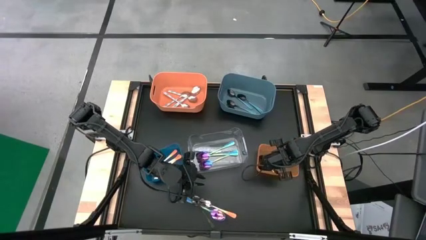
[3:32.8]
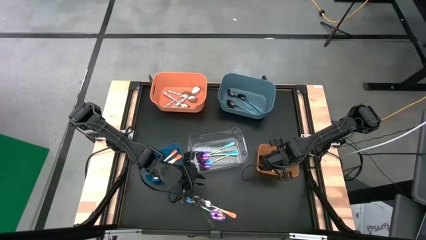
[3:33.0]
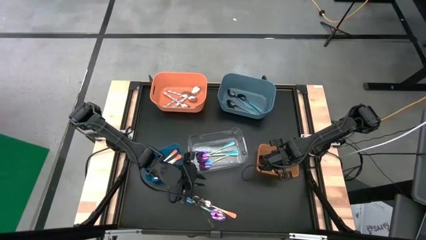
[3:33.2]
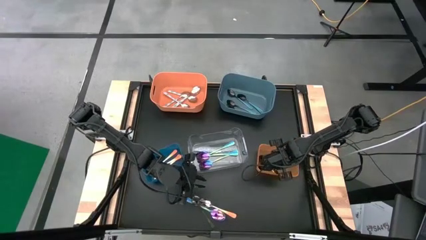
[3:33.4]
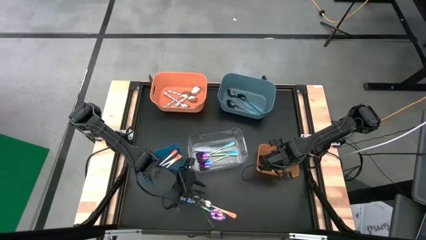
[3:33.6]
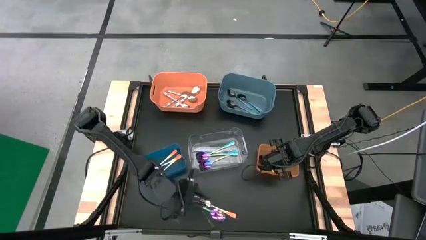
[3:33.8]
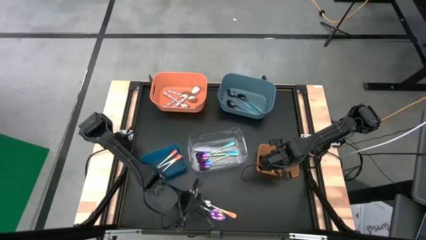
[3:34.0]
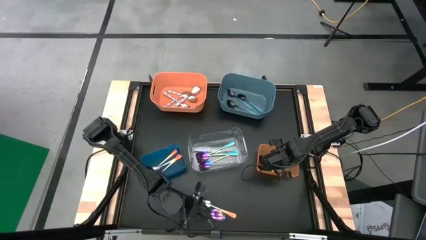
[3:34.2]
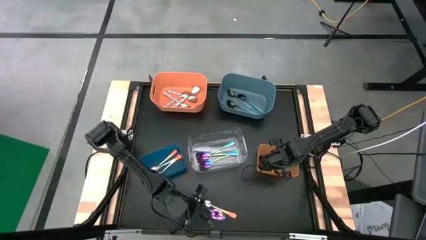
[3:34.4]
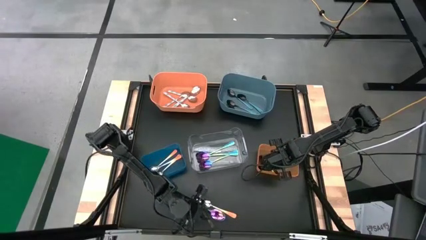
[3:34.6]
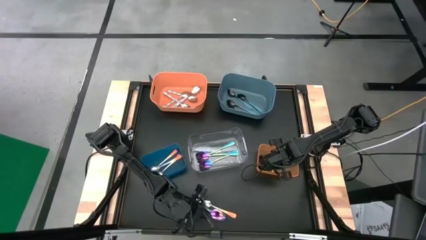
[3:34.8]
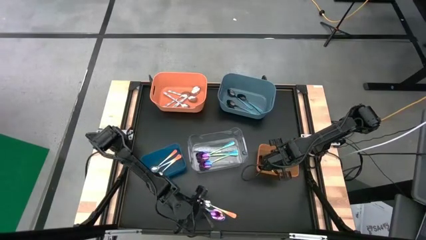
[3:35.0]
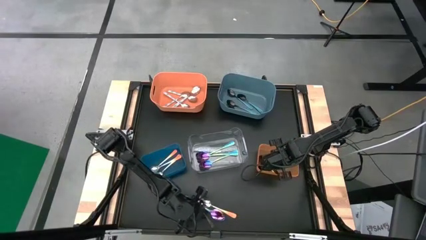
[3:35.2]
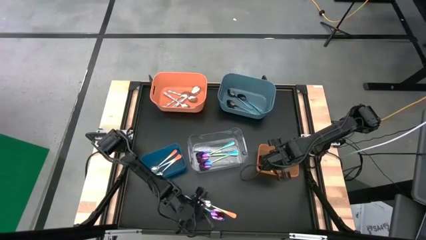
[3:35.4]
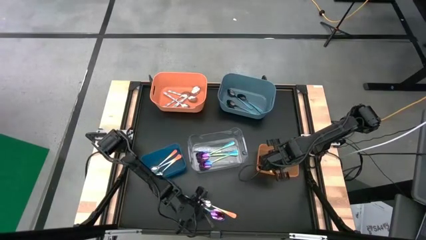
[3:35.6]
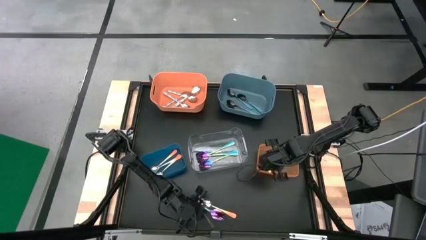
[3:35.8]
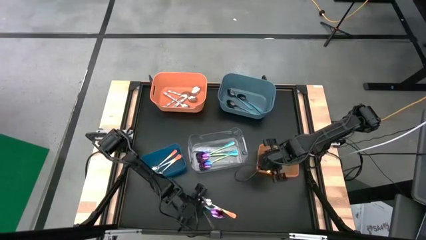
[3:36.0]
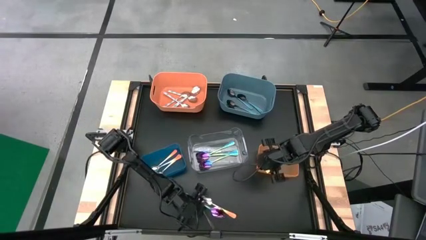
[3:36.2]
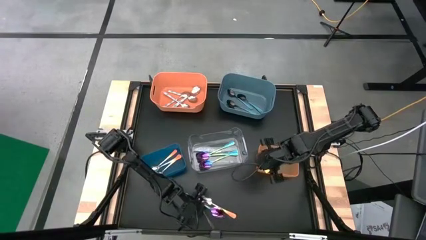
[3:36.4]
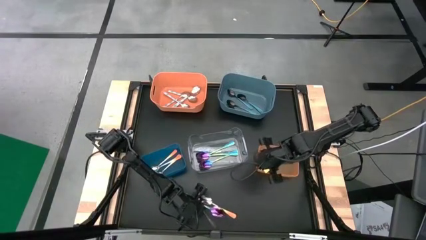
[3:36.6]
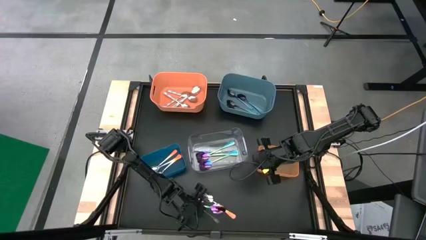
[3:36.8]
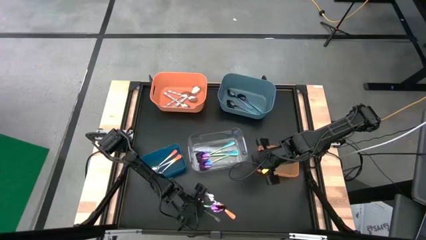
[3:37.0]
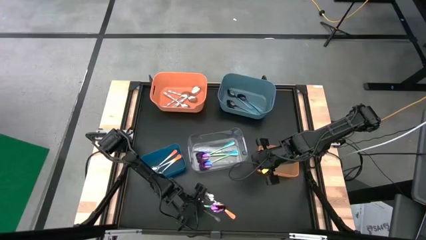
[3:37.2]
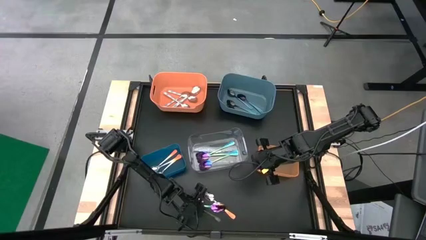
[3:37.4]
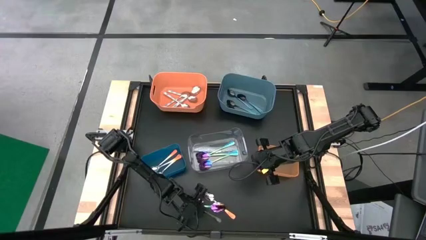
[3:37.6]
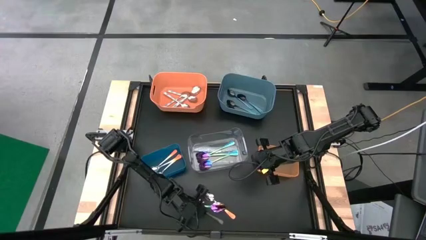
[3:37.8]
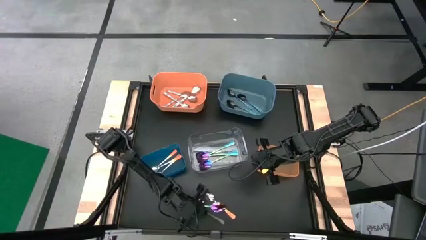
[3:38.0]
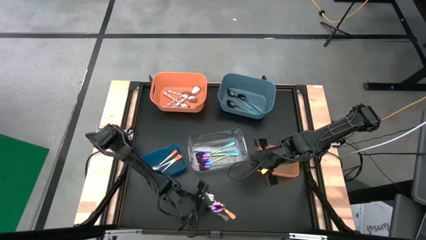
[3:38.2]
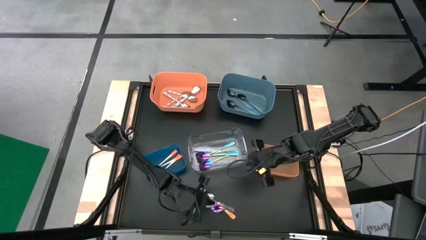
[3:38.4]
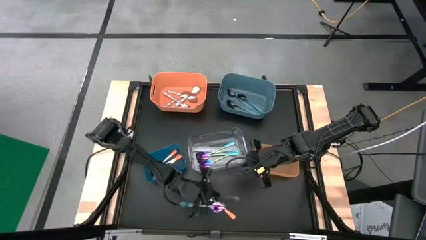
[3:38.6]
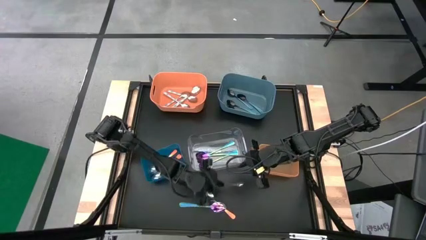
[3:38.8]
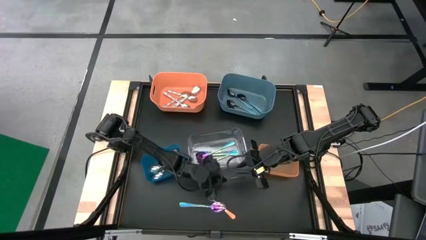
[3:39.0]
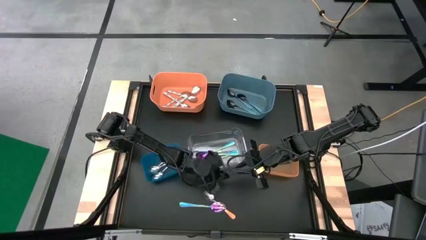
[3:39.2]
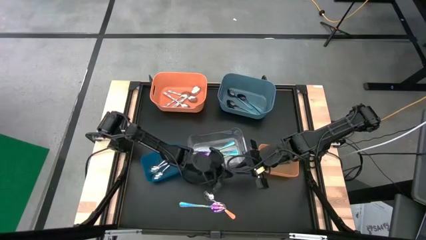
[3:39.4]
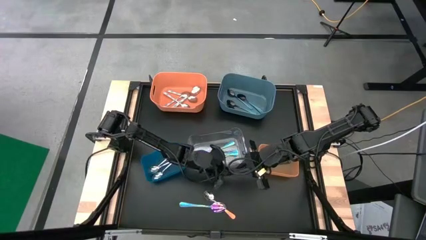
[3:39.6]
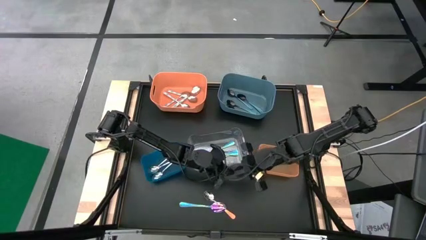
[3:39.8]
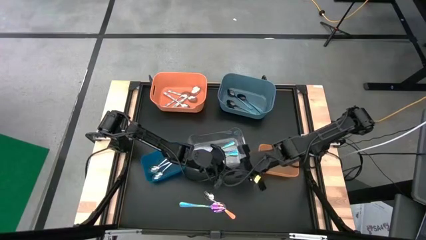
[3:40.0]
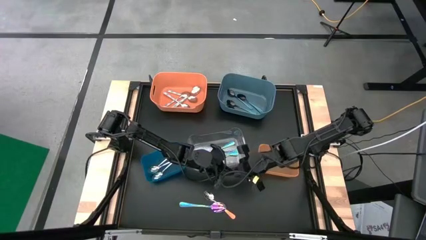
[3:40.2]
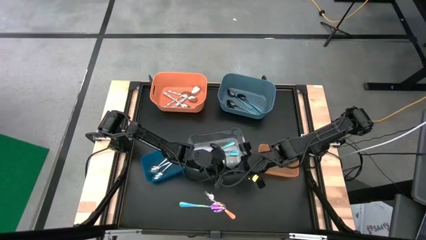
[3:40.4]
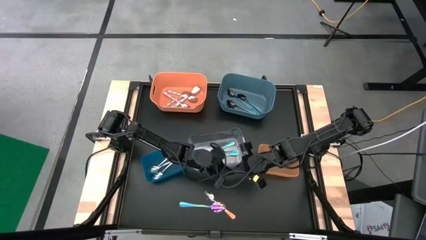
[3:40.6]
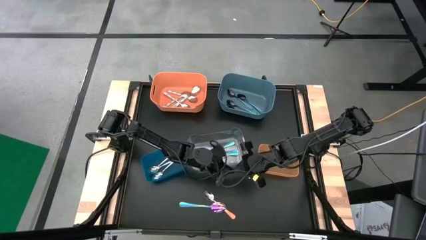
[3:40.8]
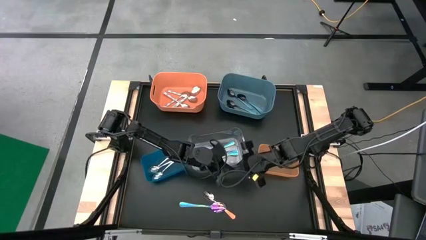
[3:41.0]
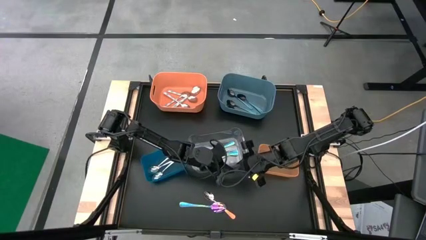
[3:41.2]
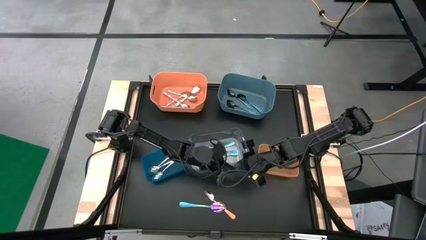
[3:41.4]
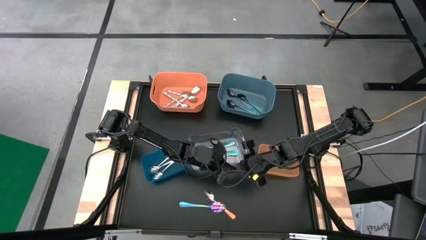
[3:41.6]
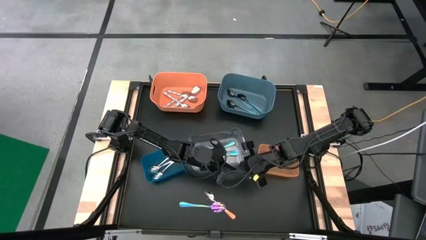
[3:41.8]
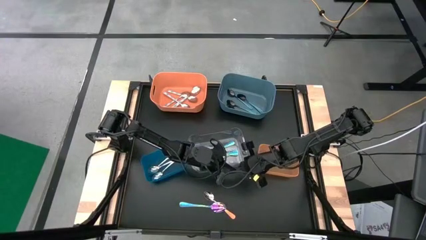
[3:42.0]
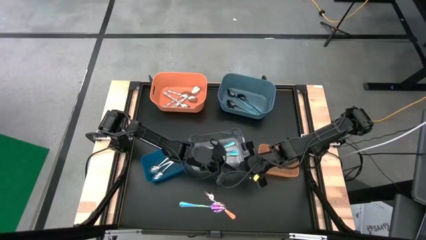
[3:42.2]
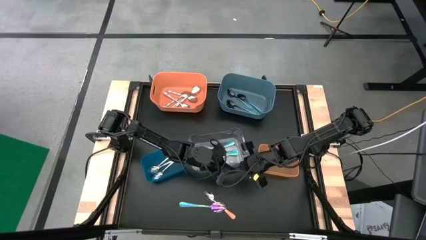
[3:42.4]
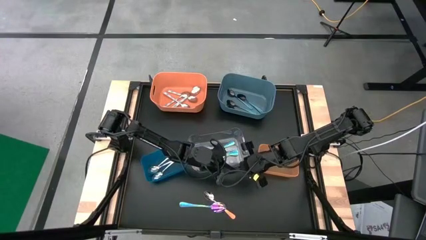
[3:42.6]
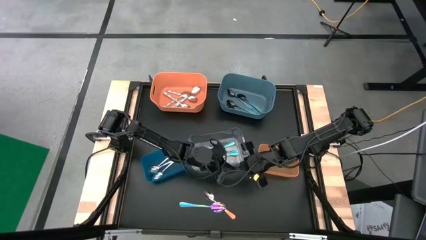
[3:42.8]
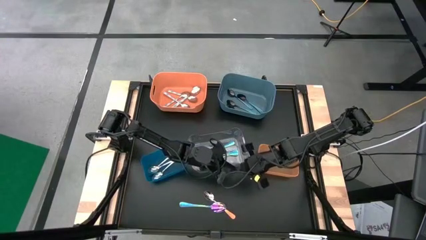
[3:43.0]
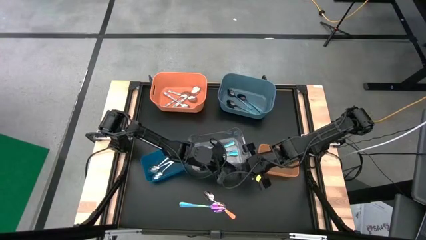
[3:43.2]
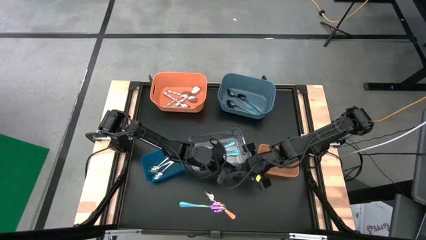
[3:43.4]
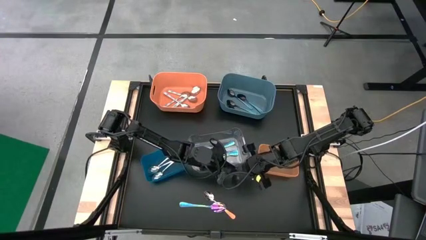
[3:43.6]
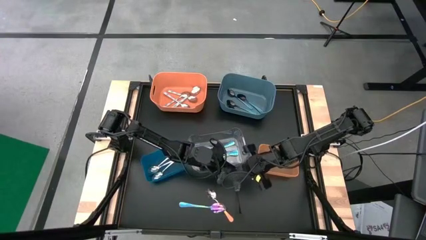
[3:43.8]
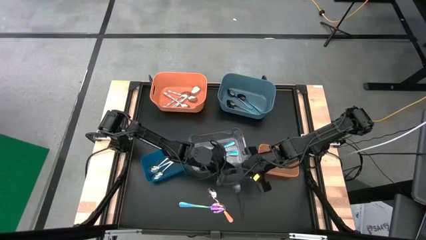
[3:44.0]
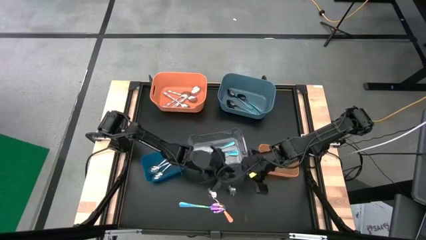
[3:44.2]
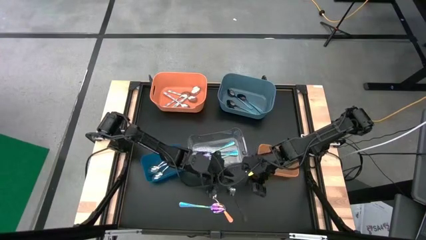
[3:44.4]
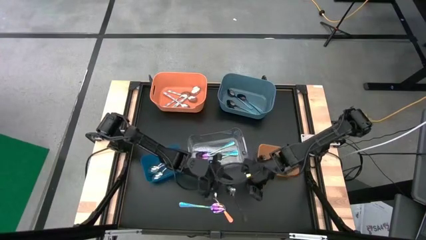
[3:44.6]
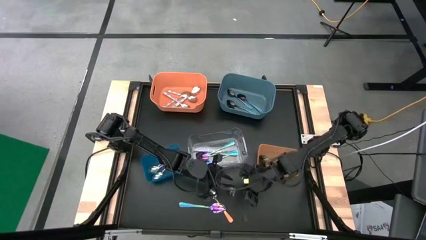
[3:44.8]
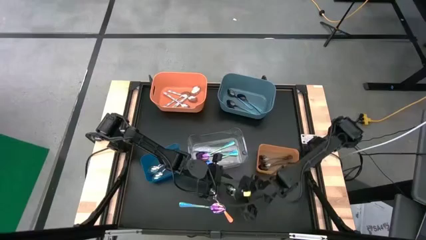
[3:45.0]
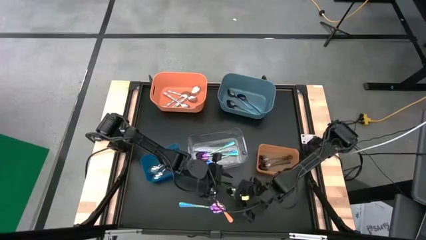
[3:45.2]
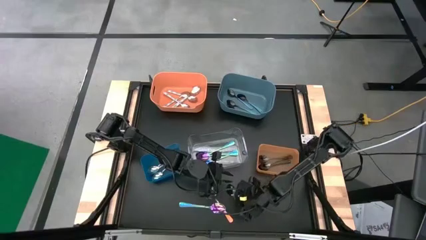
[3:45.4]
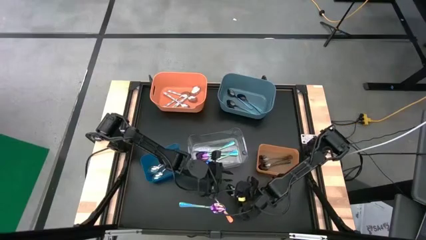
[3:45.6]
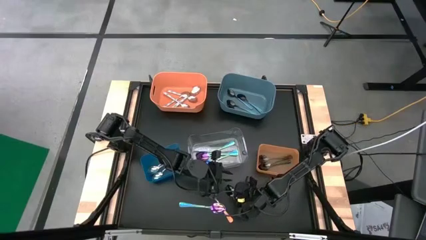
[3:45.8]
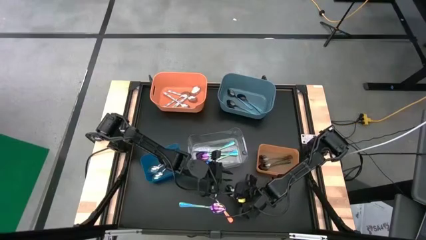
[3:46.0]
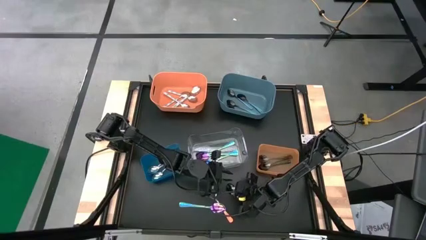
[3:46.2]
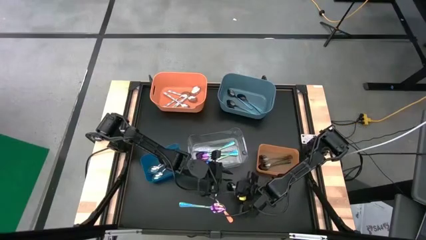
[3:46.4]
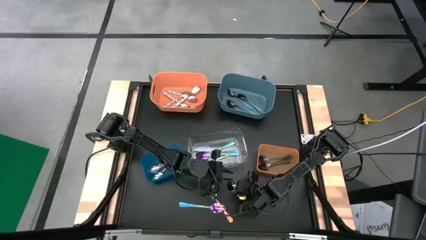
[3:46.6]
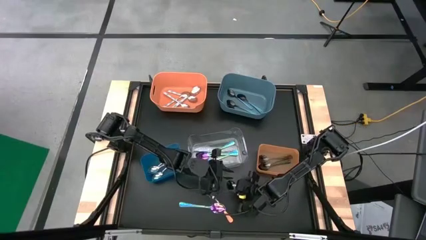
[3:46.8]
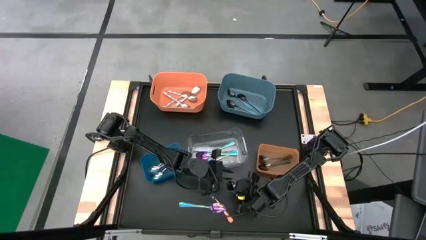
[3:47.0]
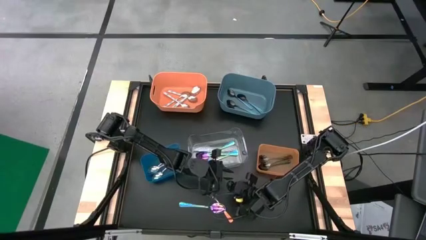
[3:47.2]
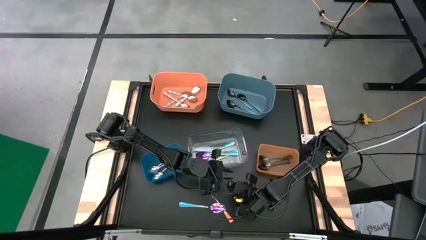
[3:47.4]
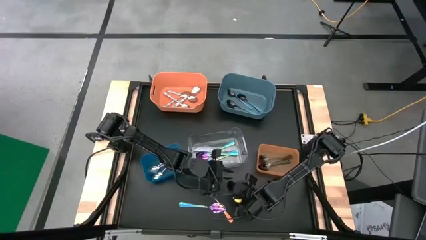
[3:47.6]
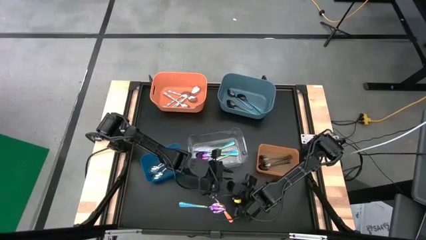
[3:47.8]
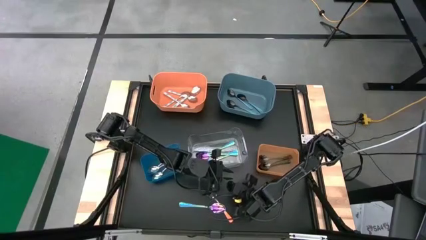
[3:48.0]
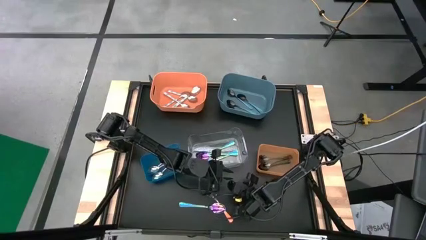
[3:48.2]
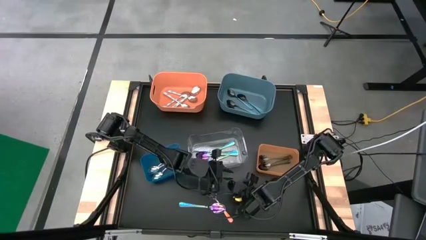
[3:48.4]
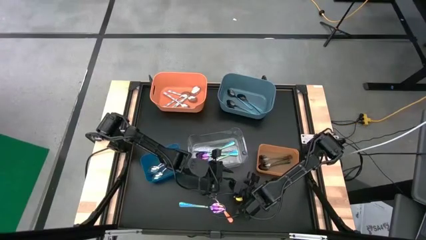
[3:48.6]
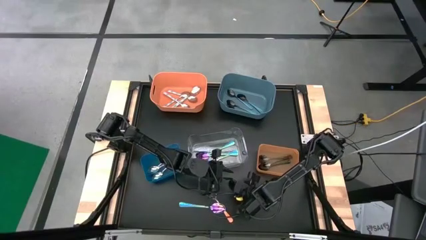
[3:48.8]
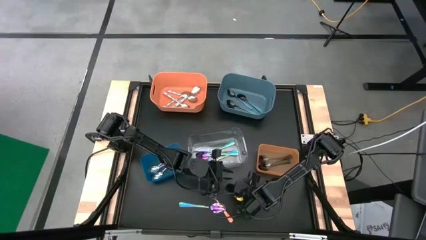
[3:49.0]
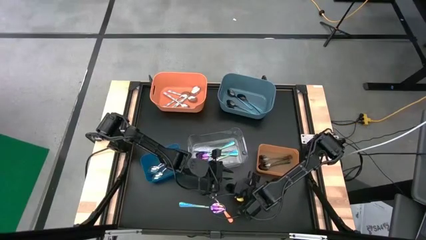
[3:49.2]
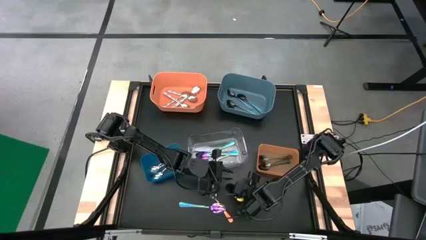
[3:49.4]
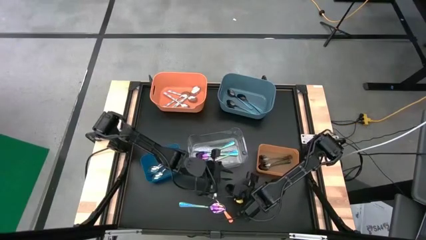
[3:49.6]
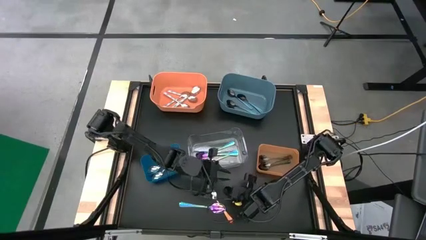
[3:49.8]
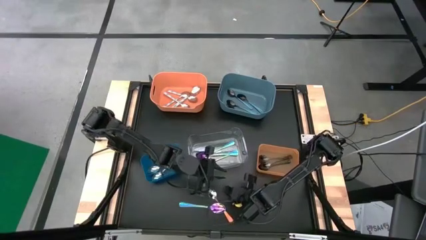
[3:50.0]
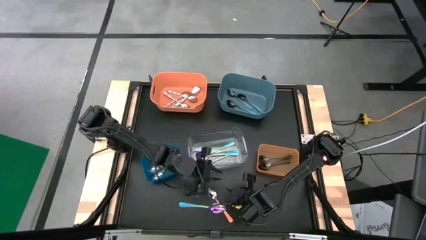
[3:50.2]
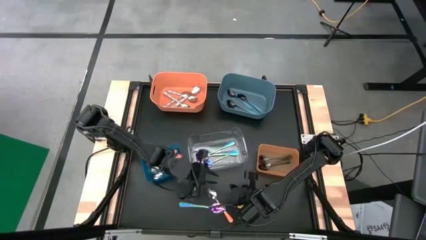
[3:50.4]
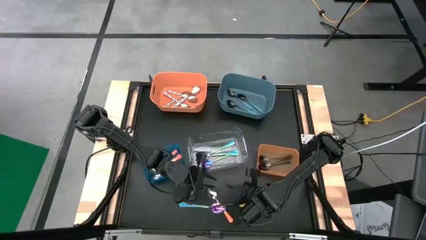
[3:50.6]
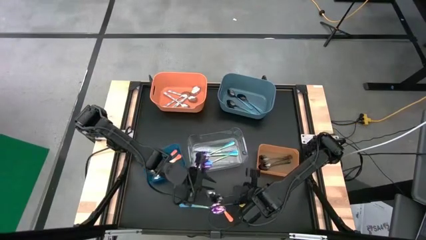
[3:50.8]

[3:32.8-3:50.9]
Task: Sort silverware by color (type)
Put the black spoon into the light orange bin
